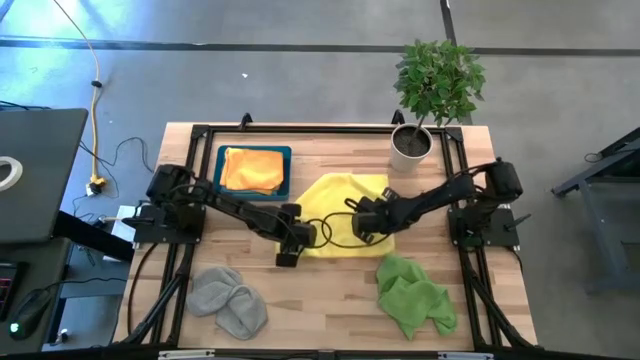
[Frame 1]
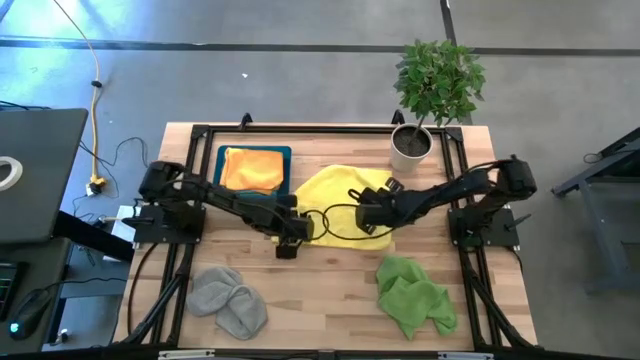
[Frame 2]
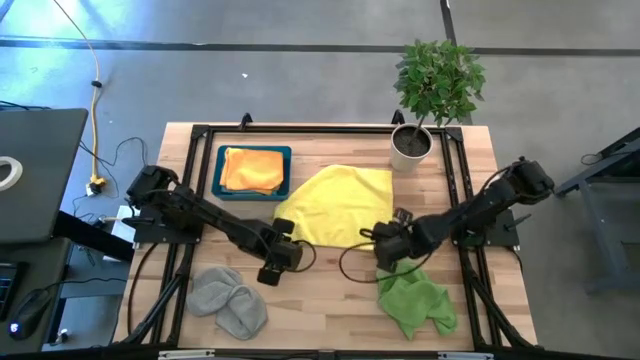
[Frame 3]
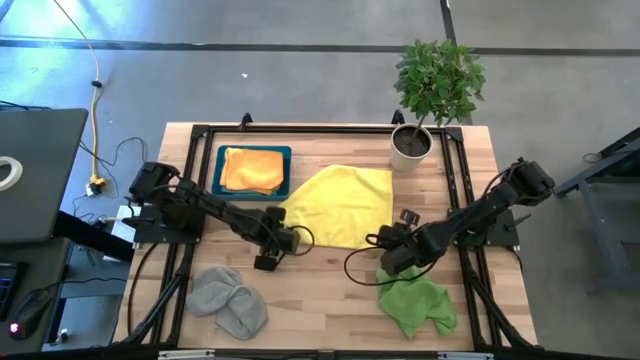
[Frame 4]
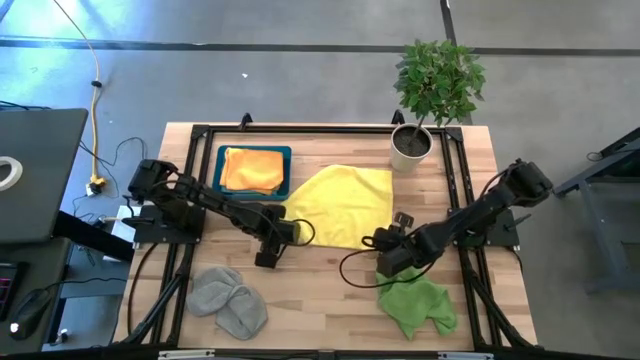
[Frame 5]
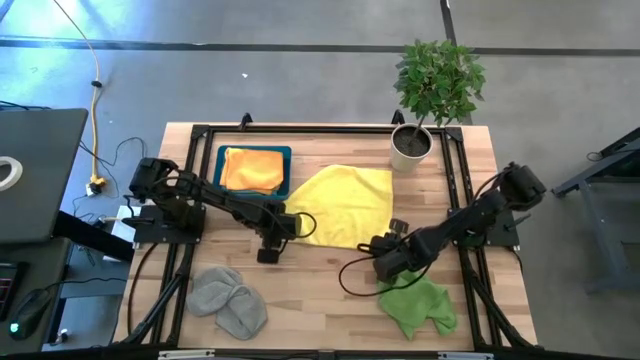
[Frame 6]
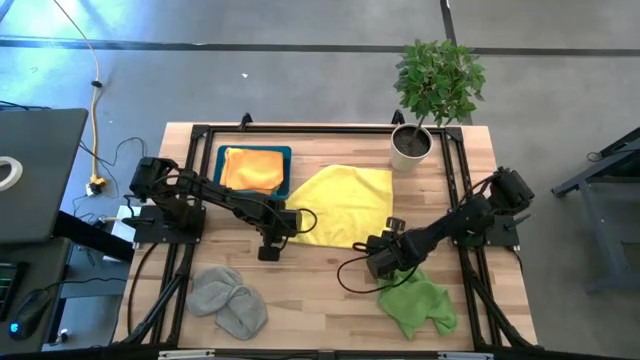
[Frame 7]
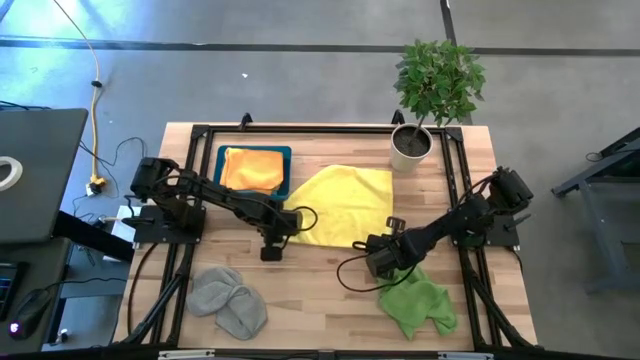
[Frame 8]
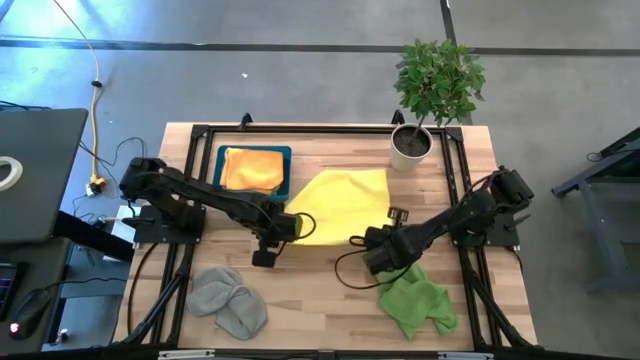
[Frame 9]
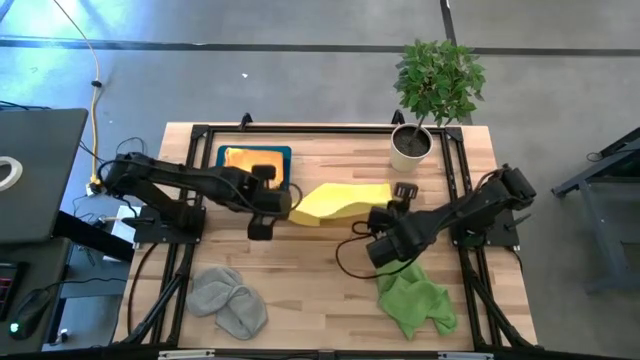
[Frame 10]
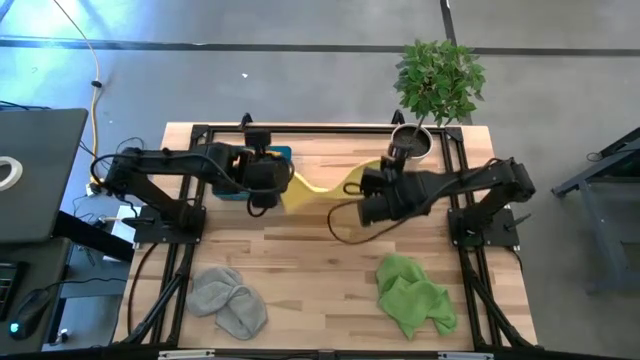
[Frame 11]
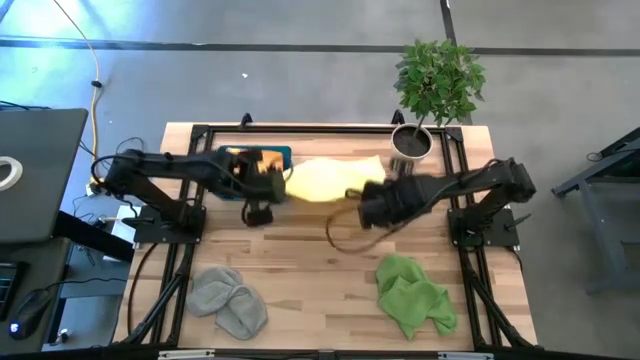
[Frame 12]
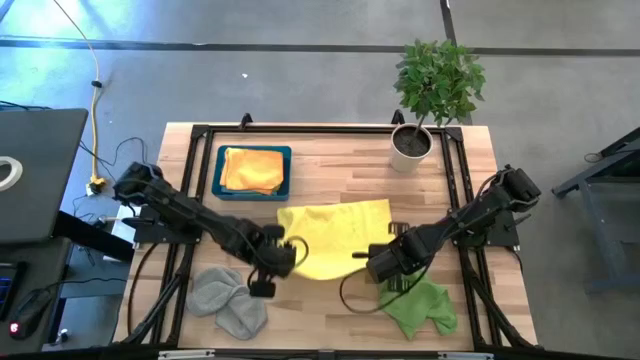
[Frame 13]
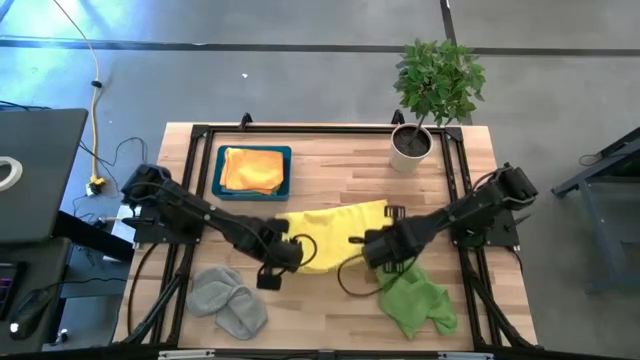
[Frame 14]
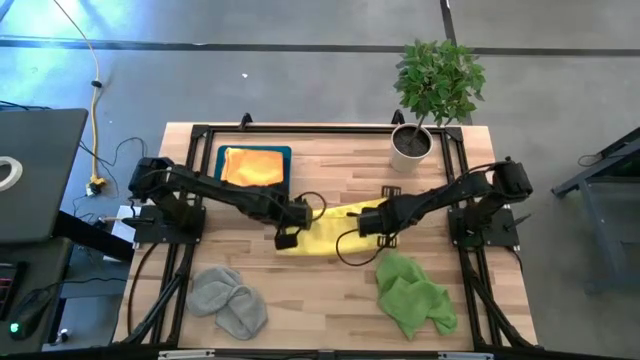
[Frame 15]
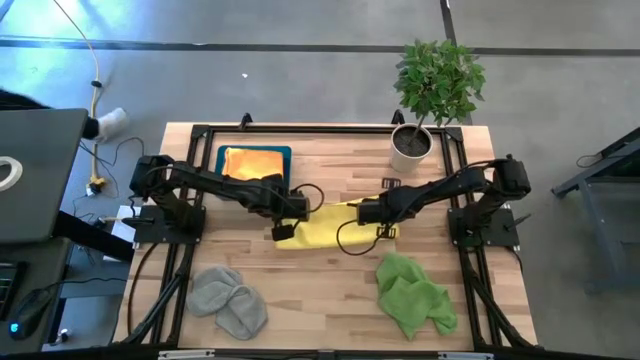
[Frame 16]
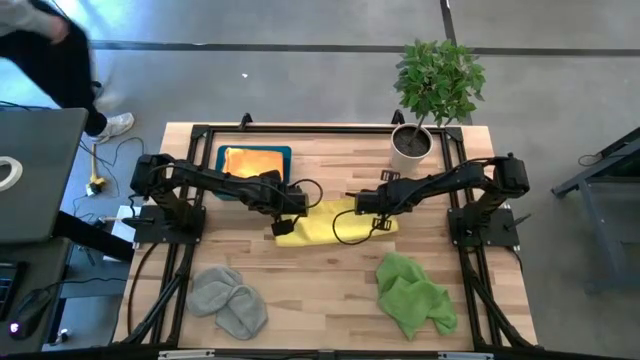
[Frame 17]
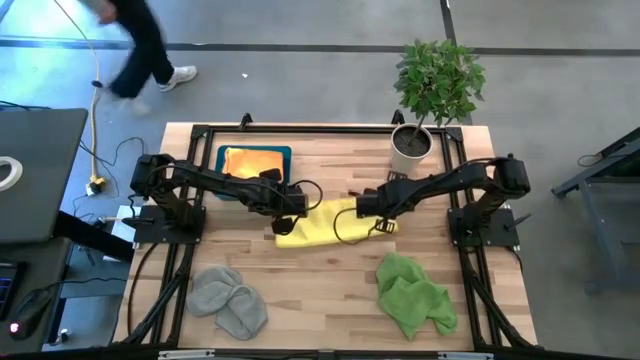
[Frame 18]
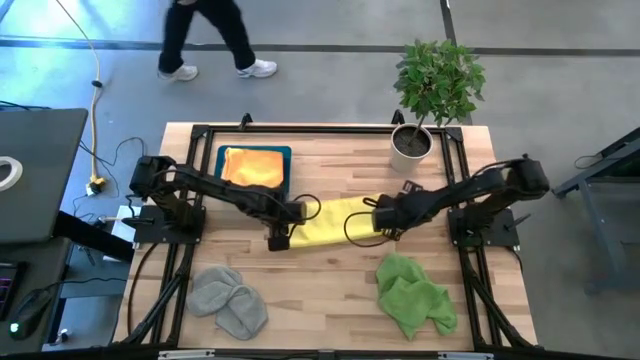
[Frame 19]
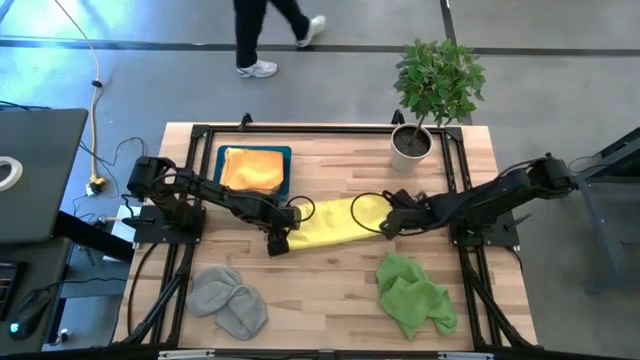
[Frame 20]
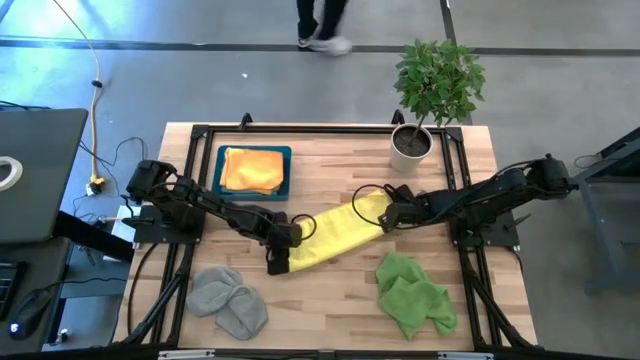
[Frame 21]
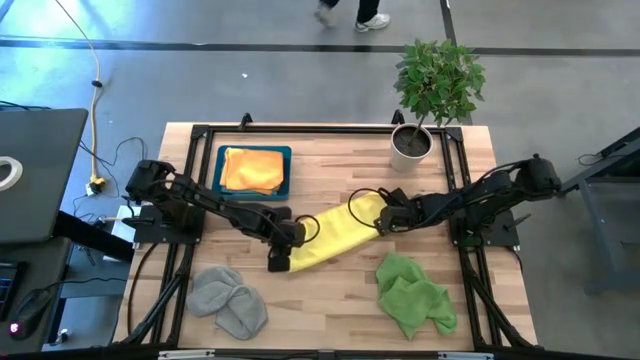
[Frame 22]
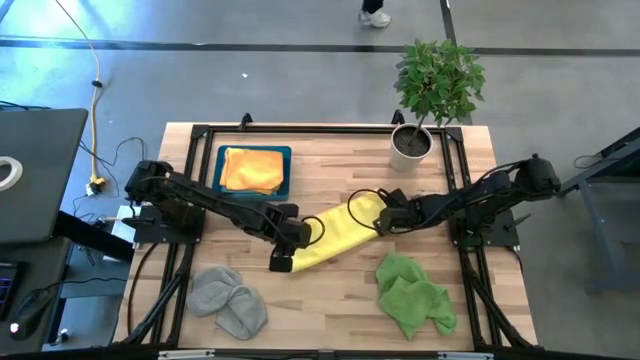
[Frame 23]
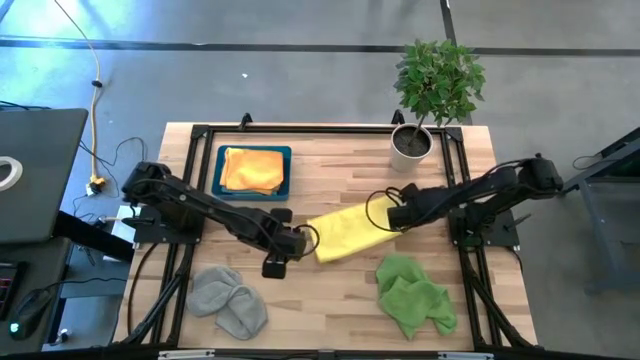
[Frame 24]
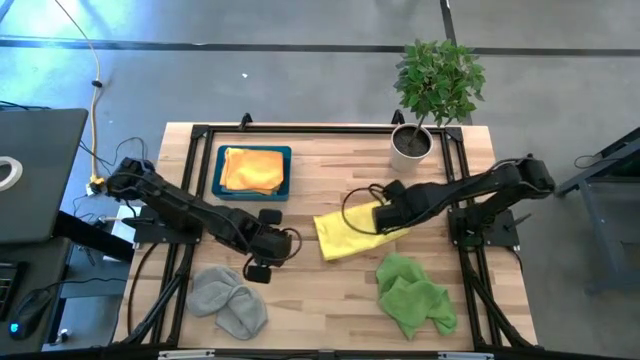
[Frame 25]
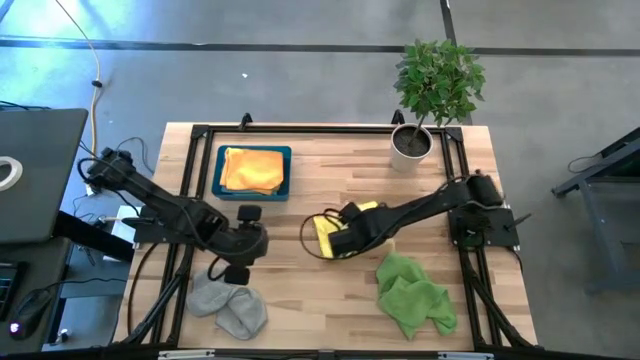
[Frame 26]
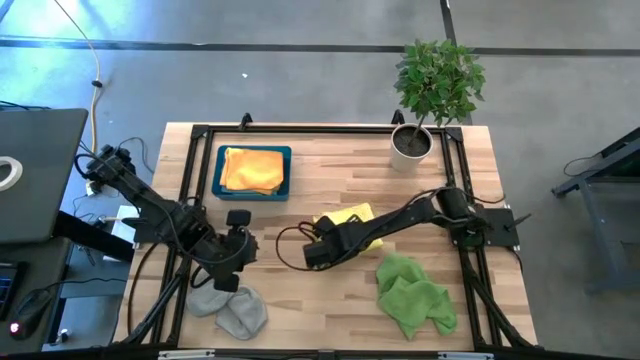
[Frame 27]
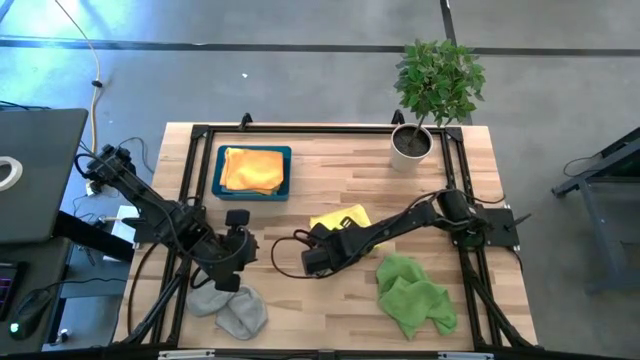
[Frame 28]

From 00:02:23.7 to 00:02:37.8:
Task: Fold microfiber towels
Fold the yellow microfiber cloth

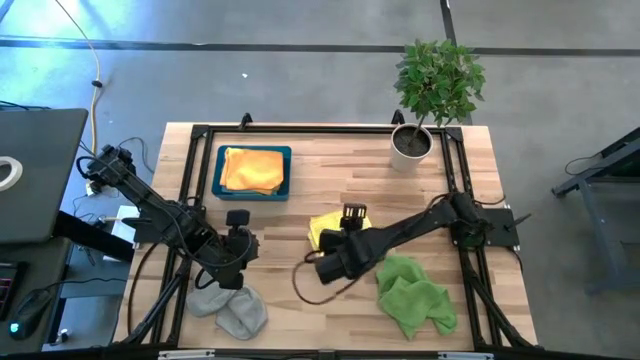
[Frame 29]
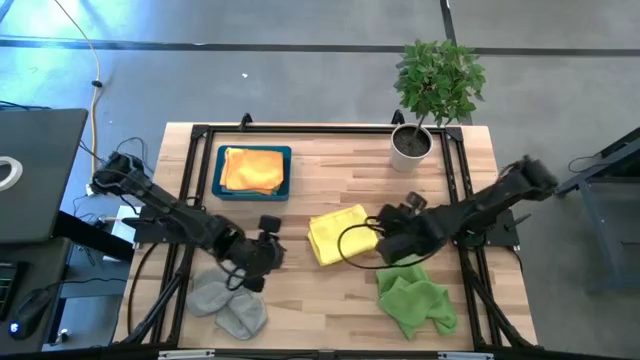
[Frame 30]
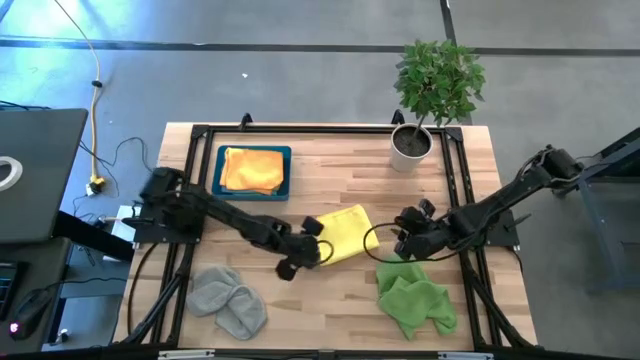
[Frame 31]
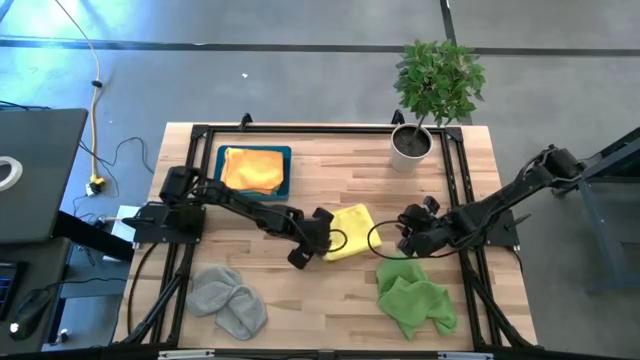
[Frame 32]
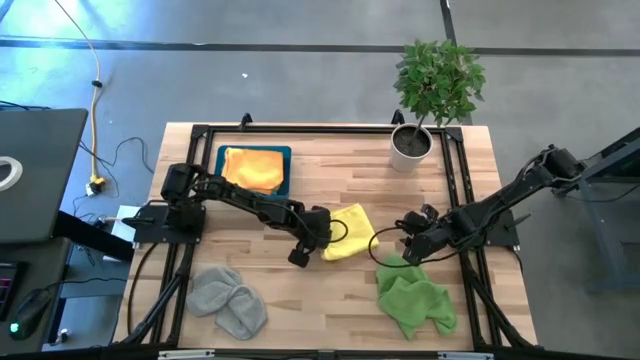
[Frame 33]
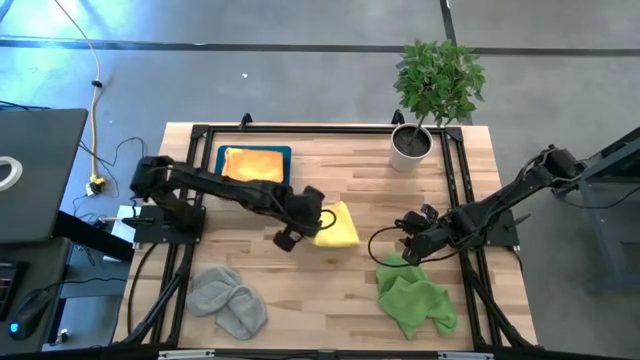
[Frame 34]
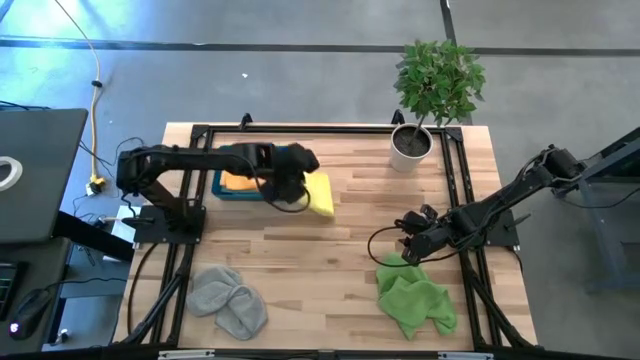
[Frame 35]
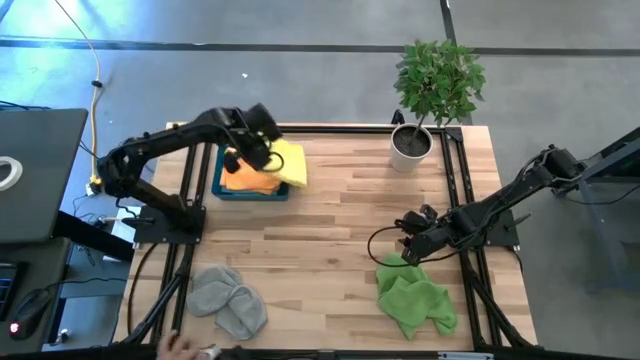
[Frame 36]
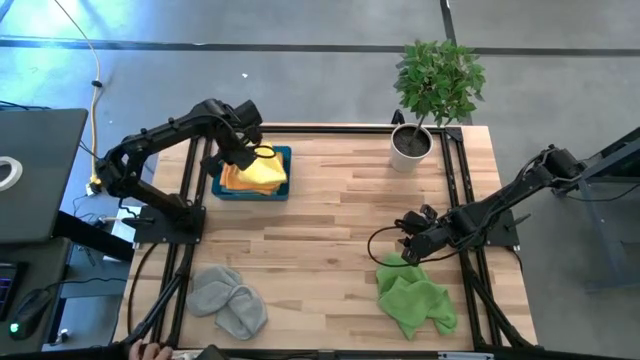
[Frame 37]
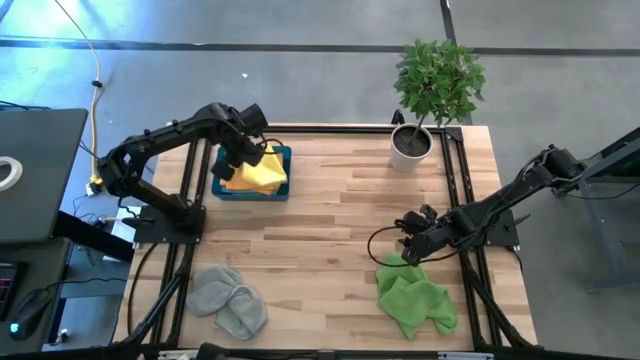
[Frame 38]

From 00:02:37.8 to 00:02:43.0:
Put the folded yellow microfiber cloth into the blue bin

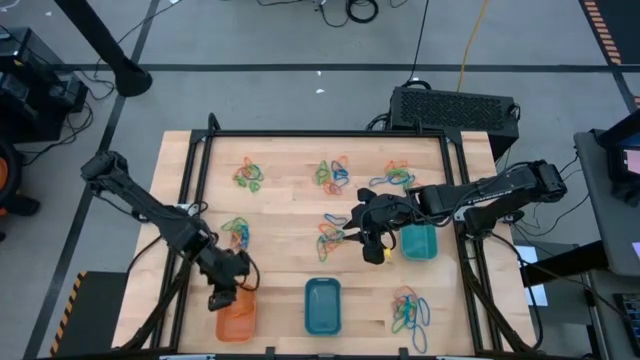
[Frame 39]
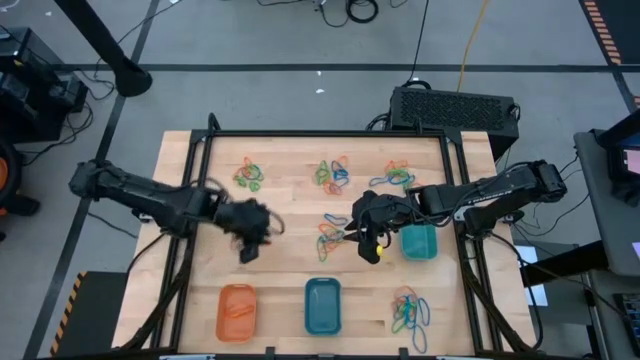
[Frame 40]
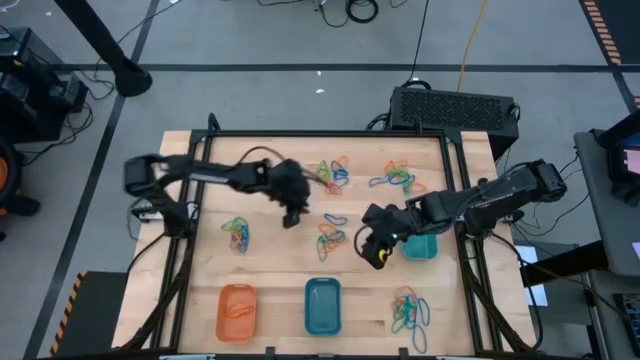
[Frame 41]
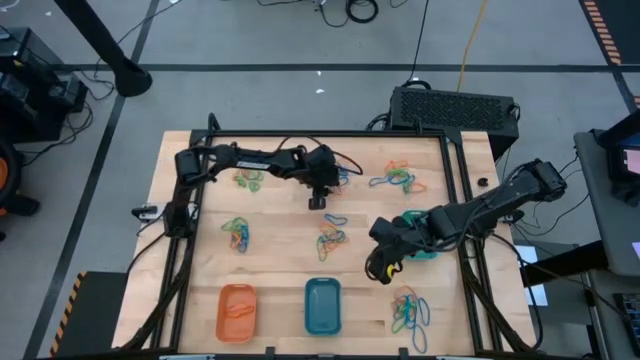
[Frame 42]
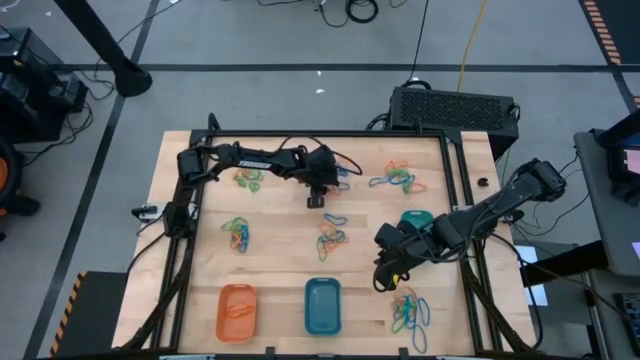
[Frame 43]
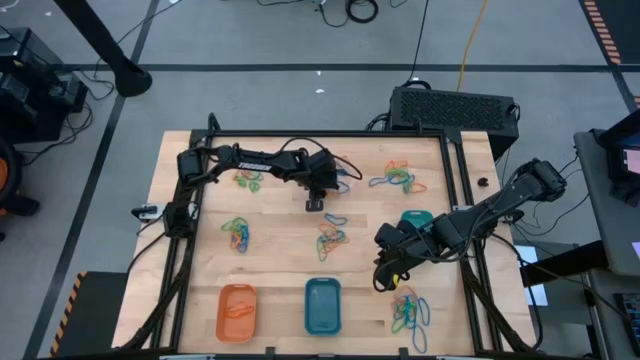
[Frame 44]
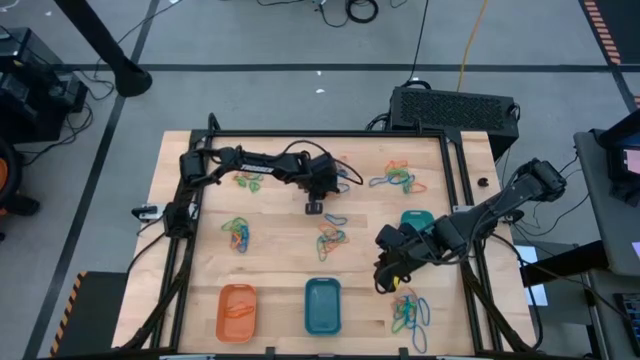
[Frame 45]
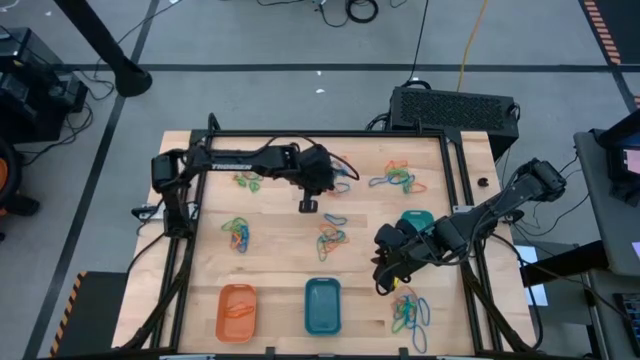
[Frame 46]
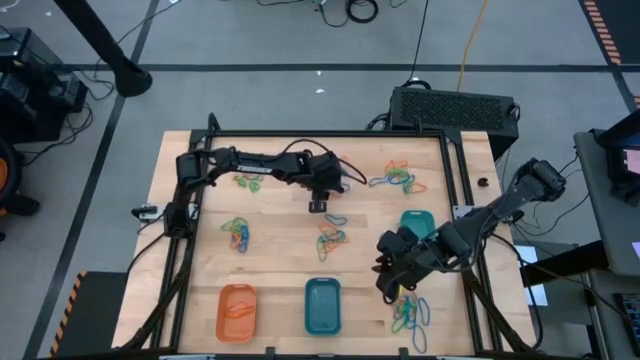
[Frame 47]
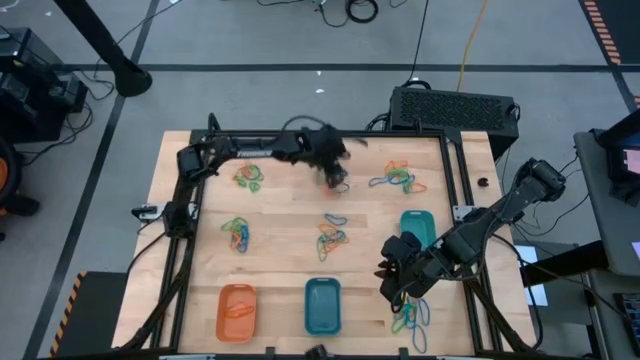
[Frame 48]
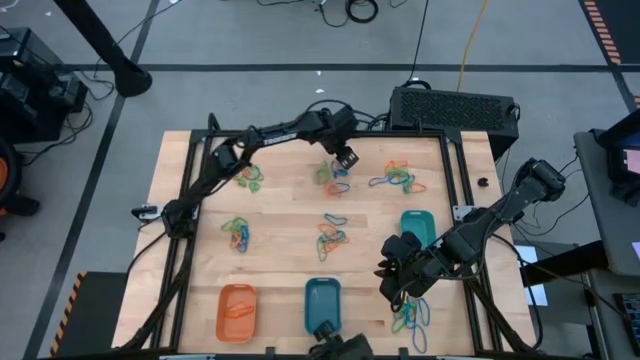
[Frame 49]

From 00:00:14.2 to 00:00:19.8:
Task: Sort rubber bands into baskets
Put the orange rubber band into the orange bin
